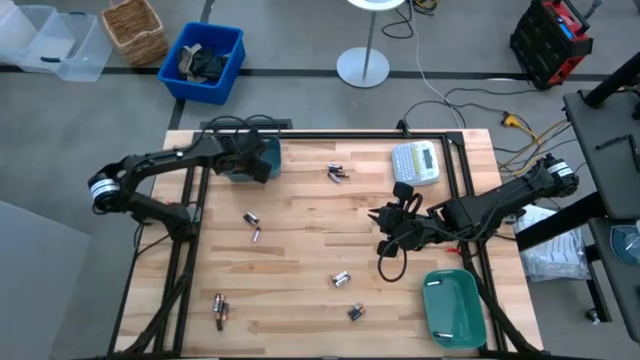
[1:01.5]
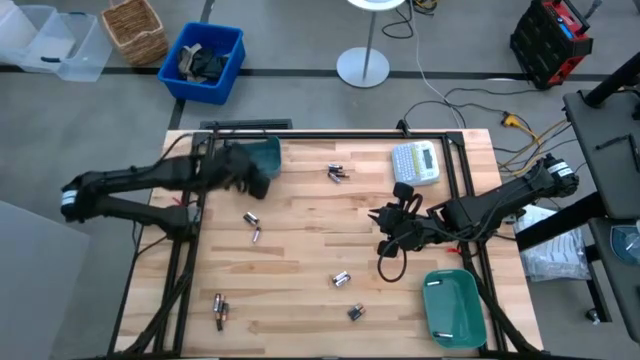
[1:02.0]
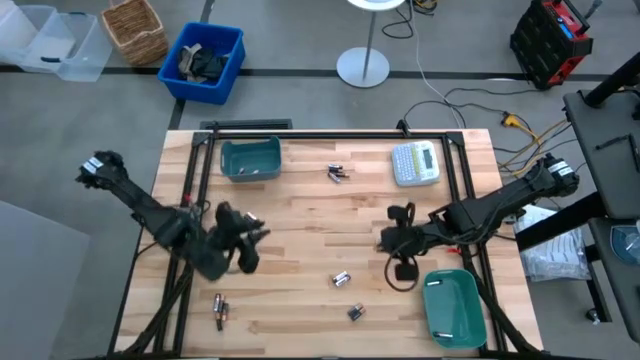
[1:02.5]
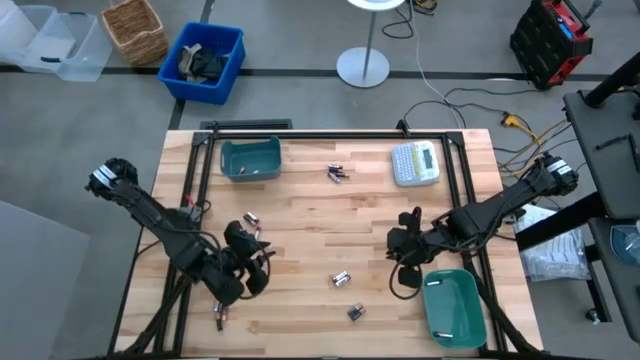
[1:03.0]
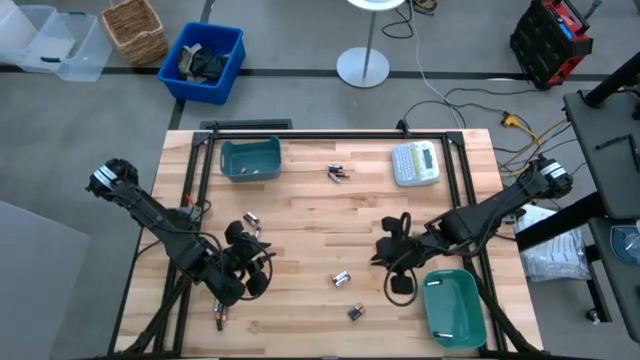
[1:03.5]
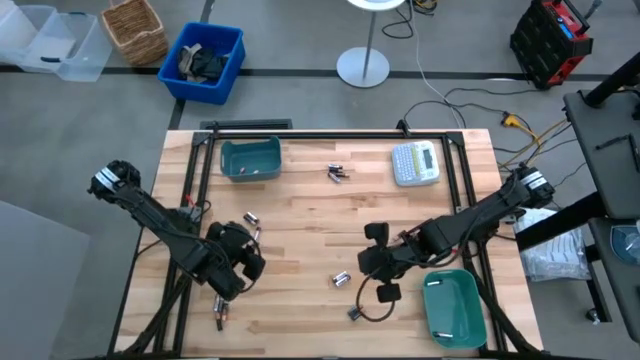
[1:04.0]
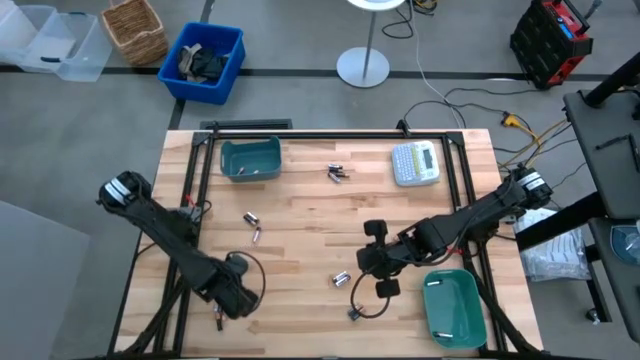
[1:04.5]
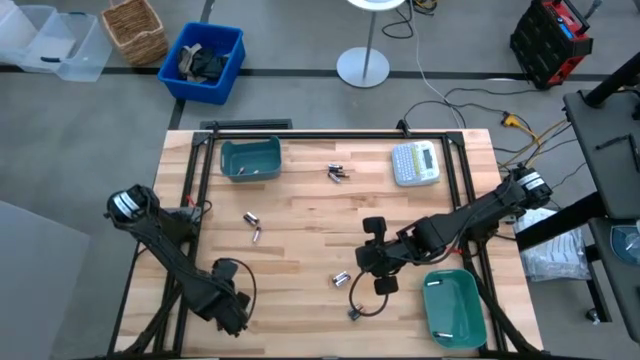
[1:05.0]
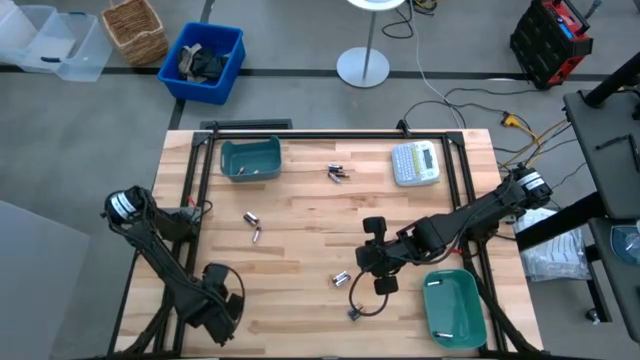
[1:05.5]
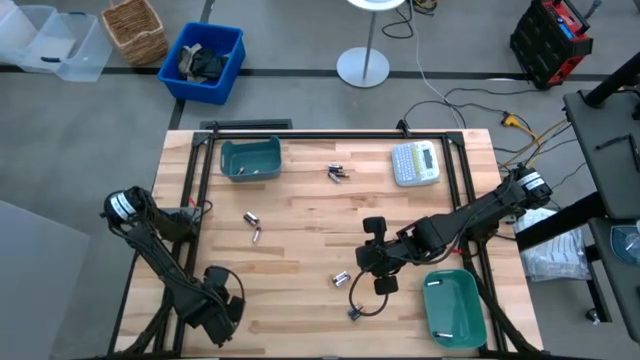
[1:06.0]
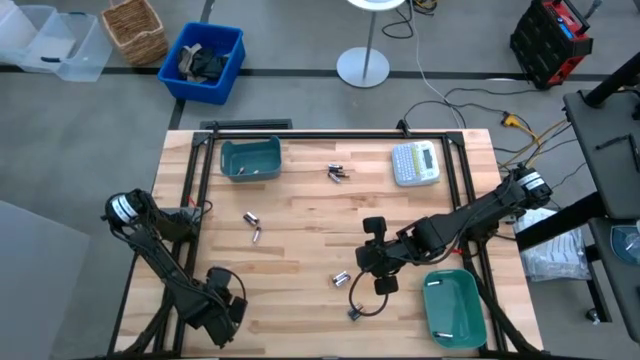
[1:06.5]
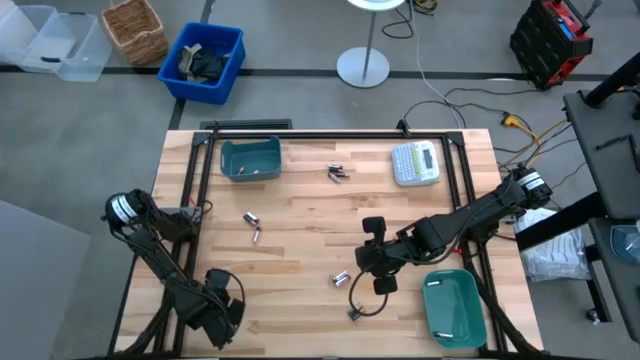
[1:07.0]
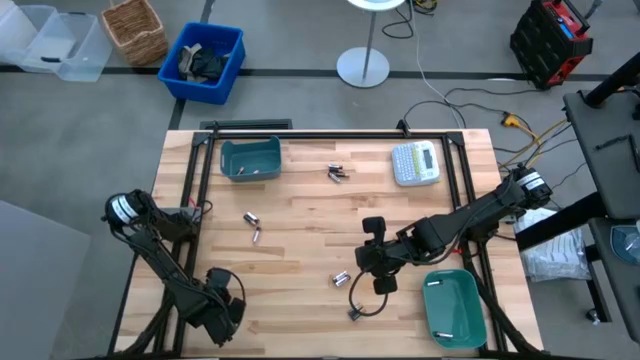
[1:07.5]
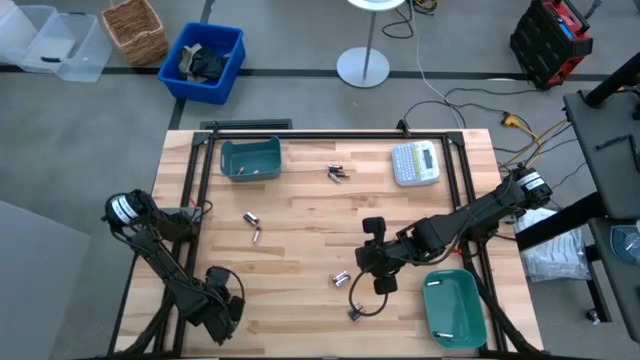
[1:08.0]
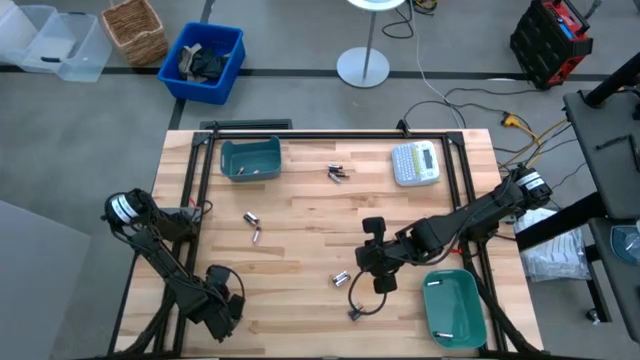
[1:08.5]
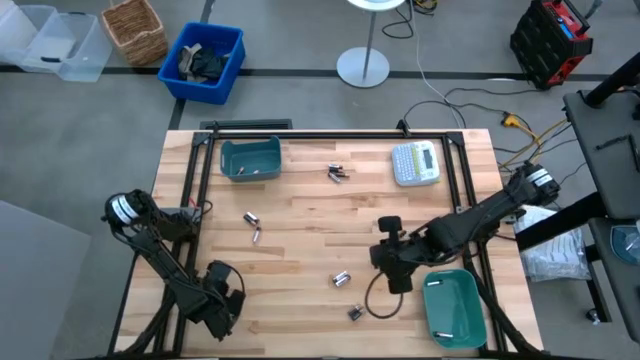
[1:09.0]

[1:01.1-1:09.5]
Task: Sort batteries
Put the silver battery into the green bin

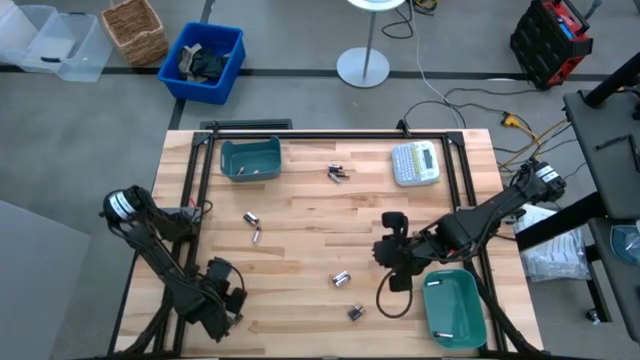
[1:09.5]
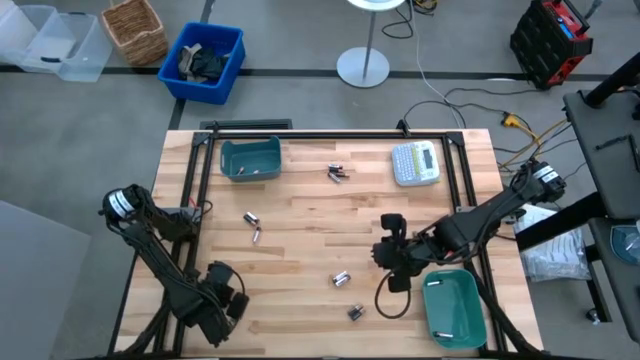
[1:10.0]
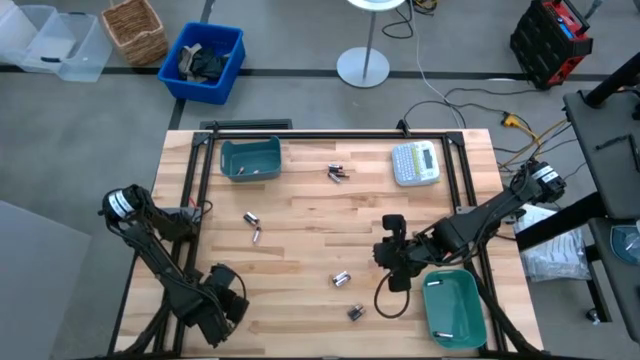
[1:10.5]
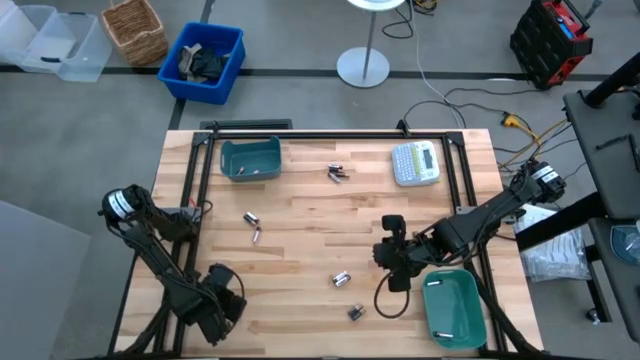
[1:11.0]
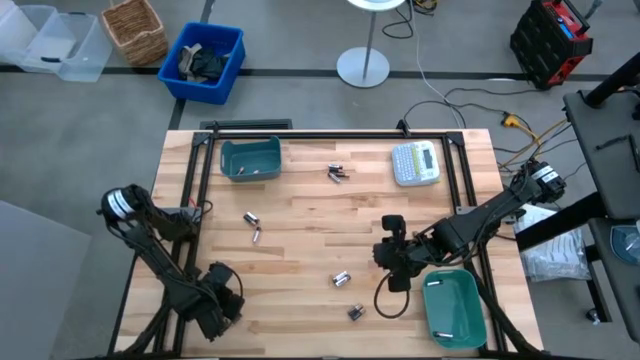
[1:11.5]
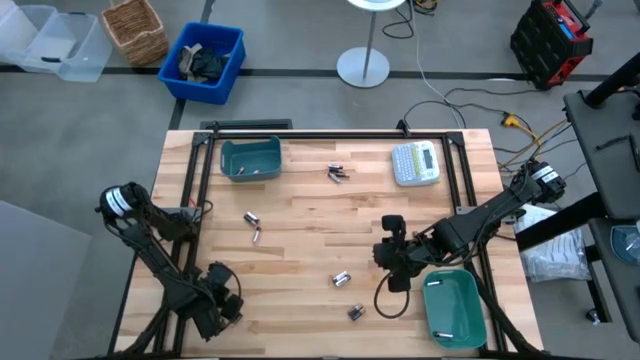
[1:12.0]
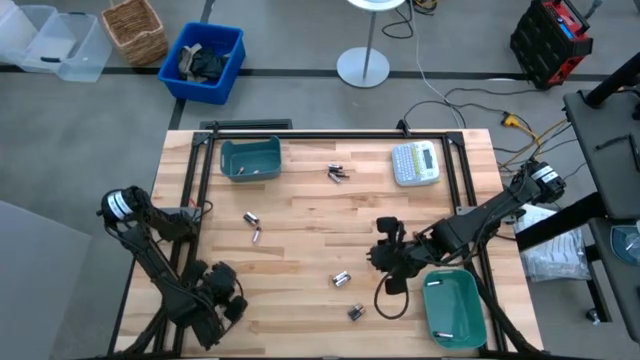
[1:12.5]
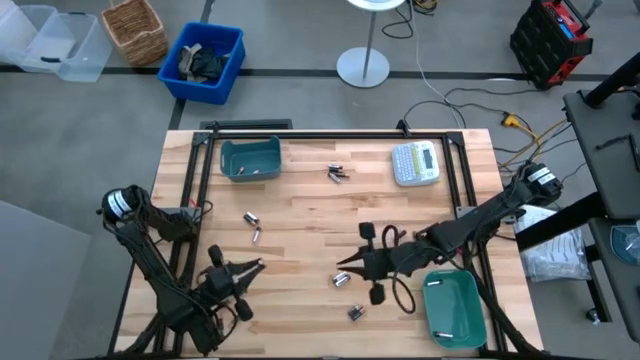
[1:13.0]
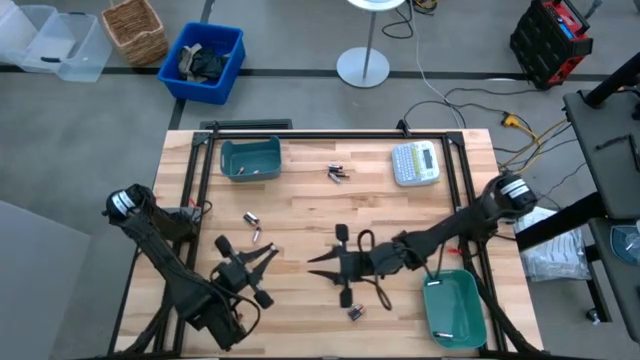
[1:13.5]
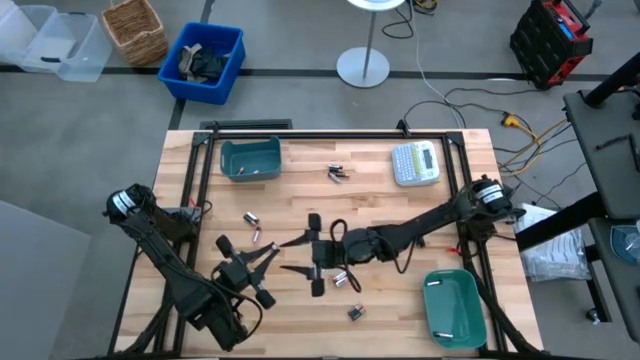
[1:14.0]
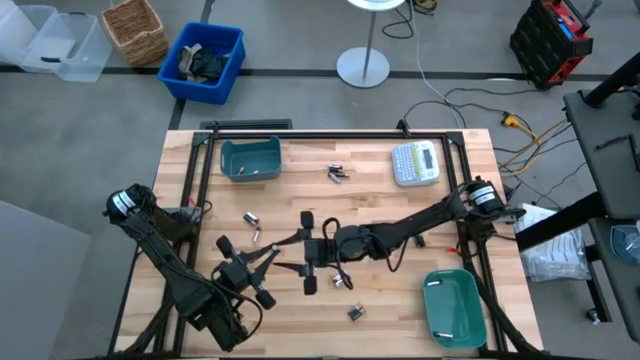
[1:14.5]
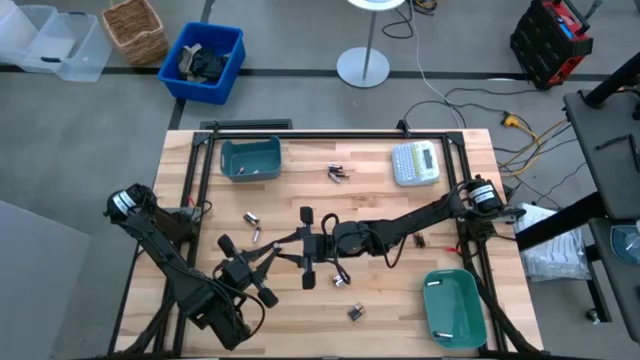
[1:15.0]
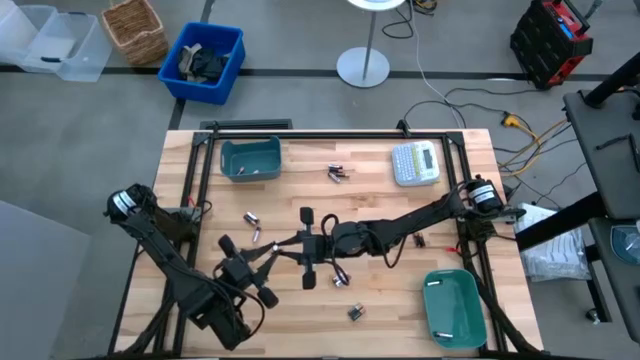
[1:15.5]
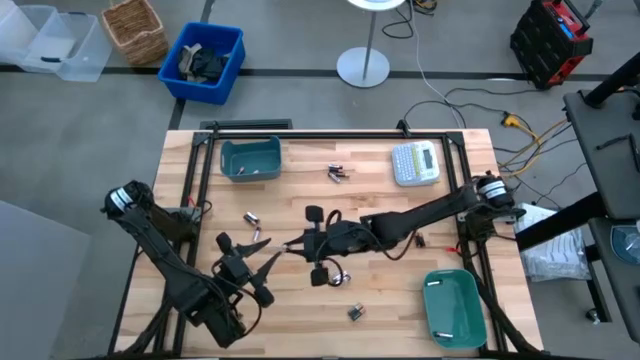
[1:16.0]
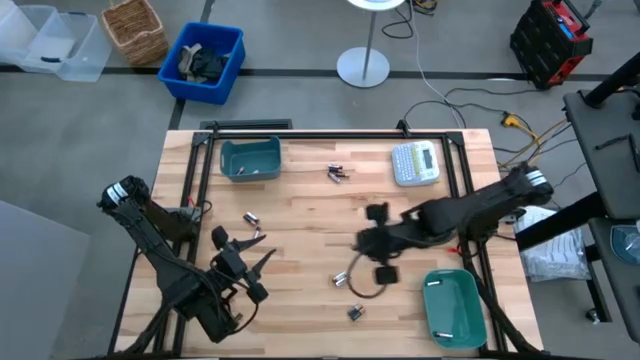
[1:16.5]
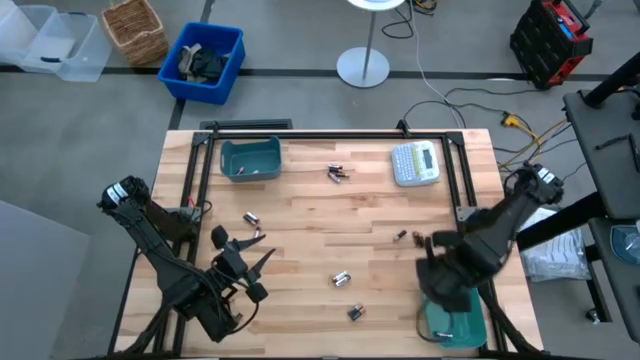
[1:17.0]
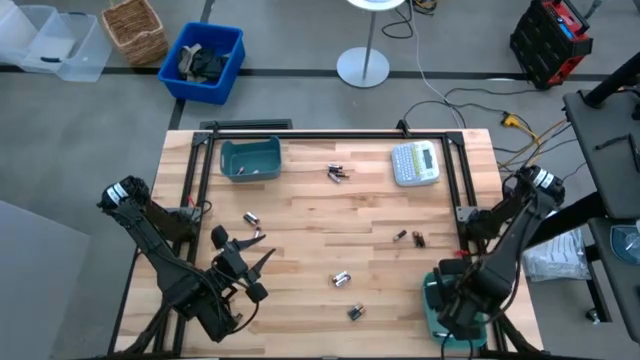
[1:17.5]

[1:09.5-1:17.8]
Put the silver battery into the green bin

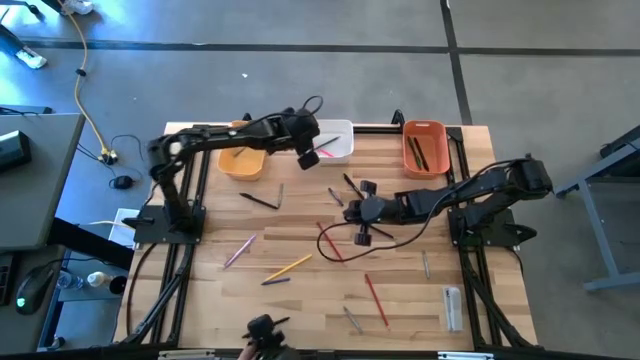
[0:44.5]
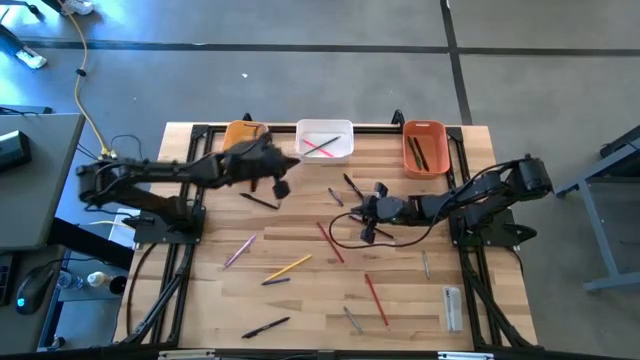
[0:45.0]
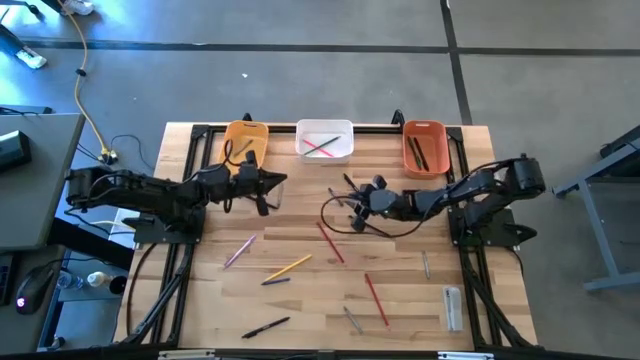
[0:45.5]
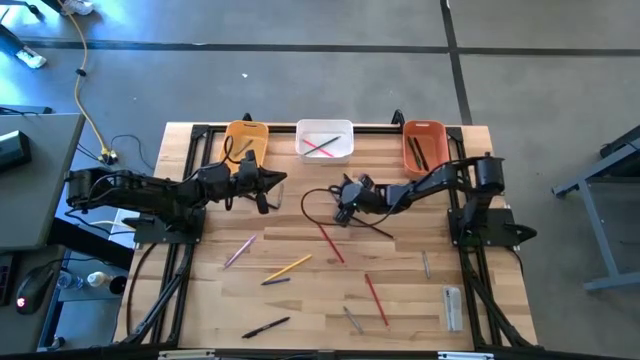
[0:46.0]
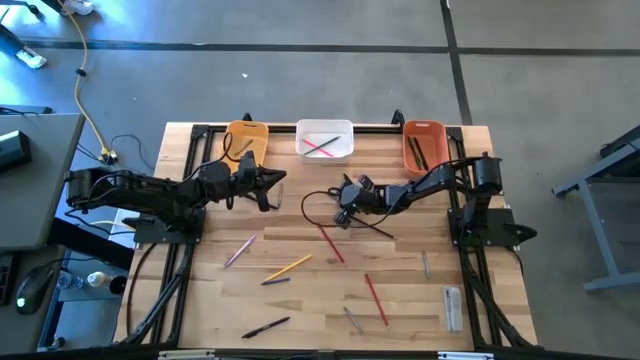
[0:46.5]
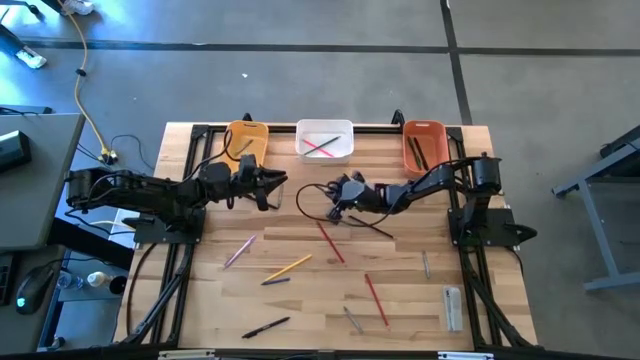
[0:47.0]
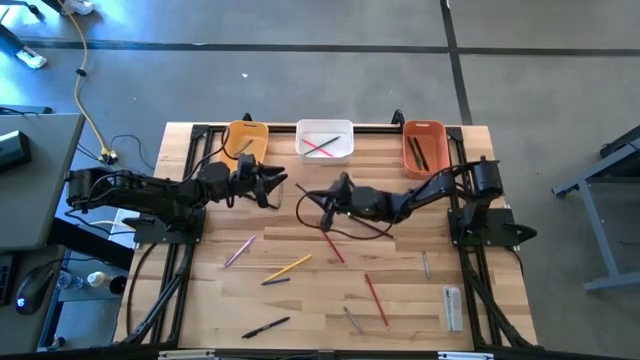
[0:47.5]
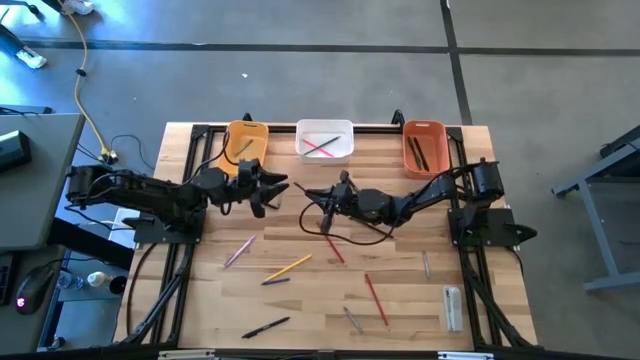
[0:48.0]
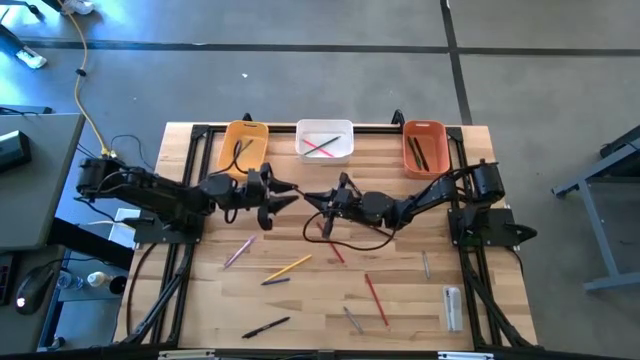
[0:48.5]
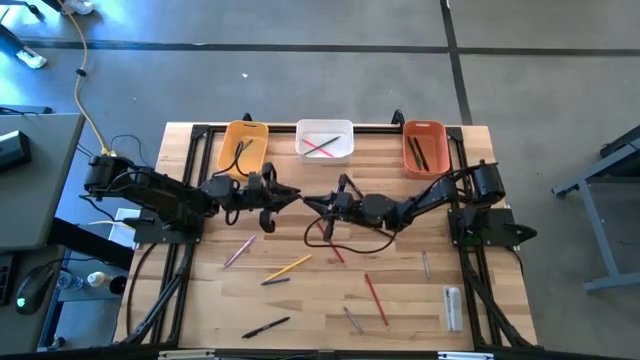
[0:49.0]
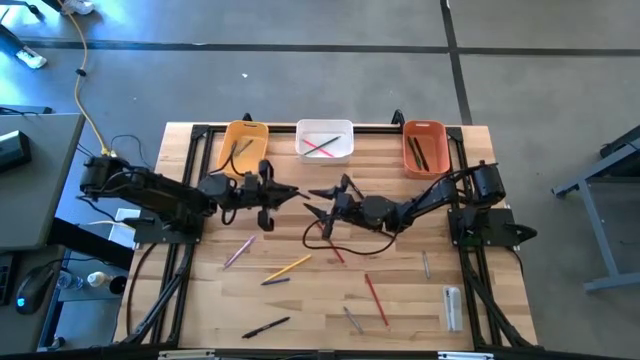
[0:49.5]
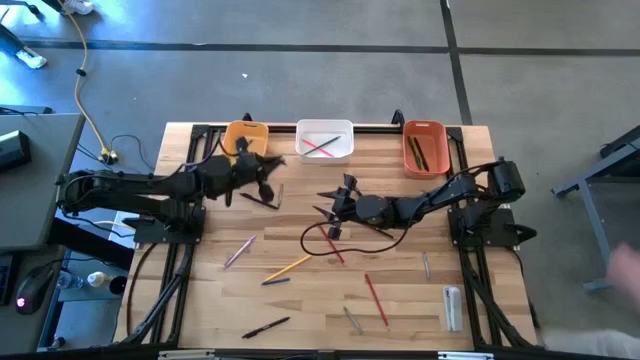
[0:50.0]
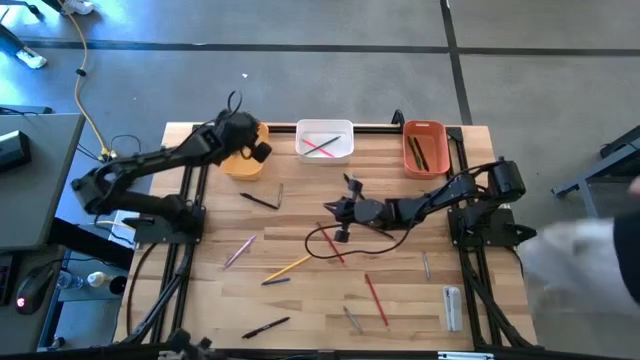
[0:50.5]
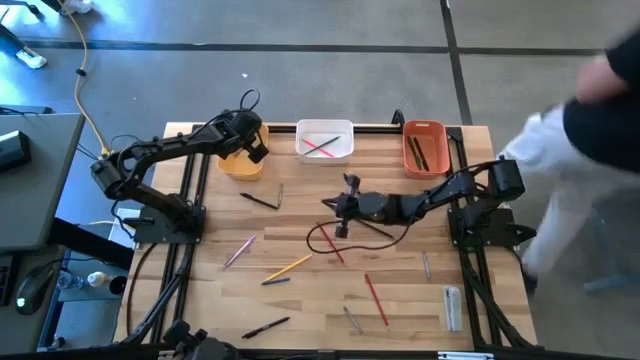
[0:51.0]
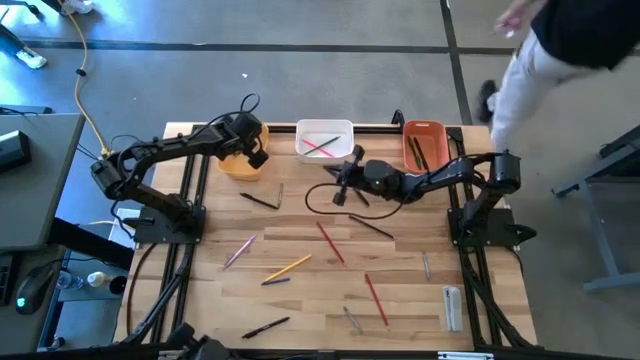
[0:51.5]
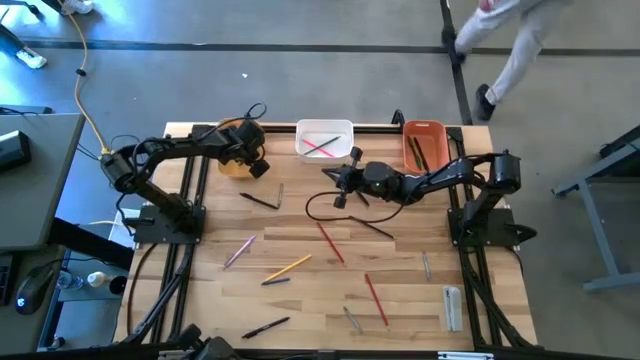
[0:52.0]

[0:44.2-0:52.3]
Task: Sort crayons/erasers/pens/pencils in bins
Put the blue crayon into the yellow bin
